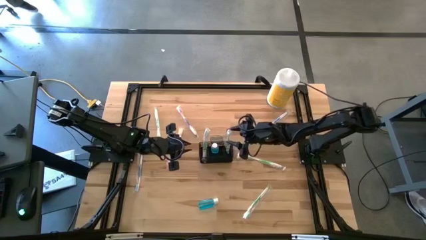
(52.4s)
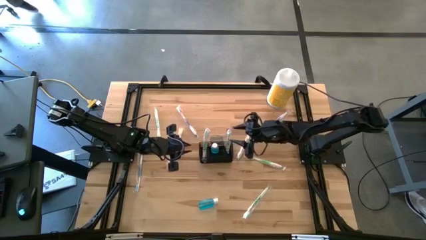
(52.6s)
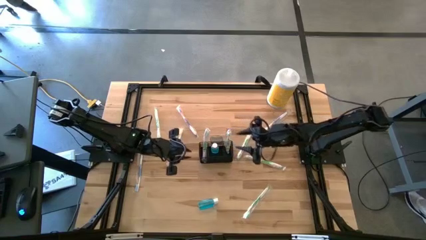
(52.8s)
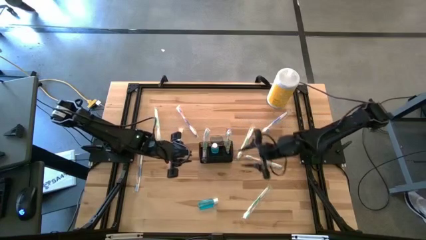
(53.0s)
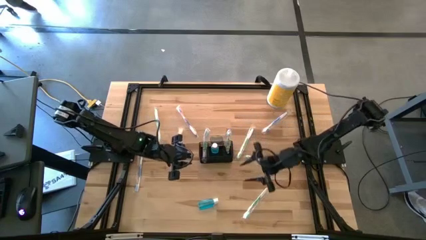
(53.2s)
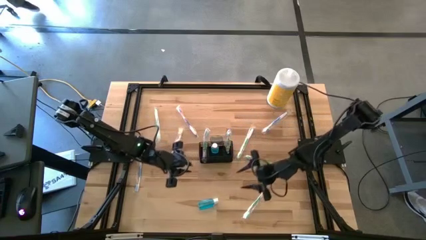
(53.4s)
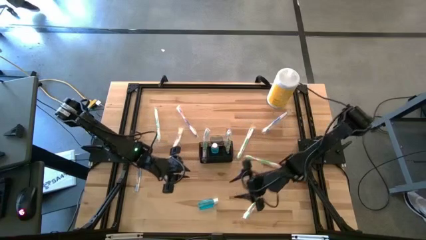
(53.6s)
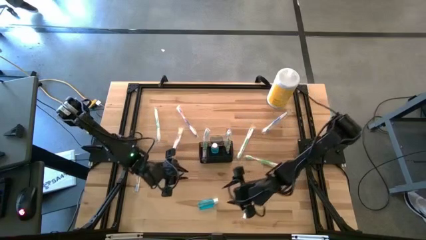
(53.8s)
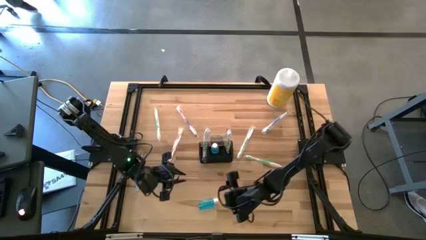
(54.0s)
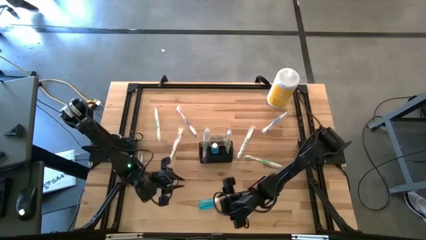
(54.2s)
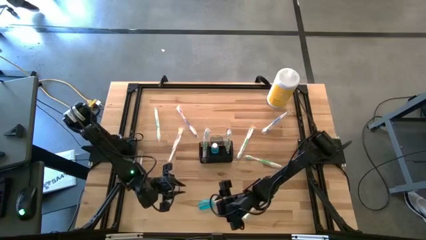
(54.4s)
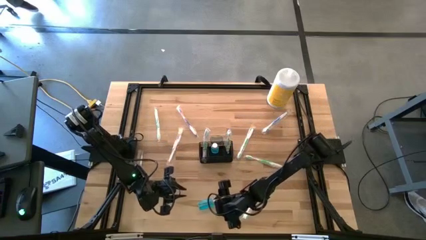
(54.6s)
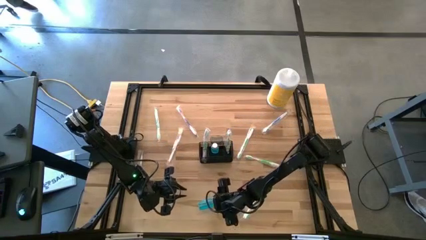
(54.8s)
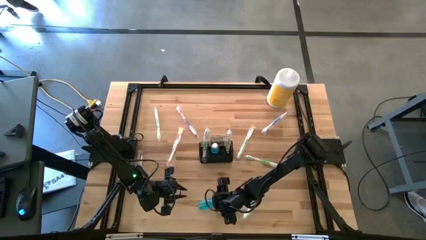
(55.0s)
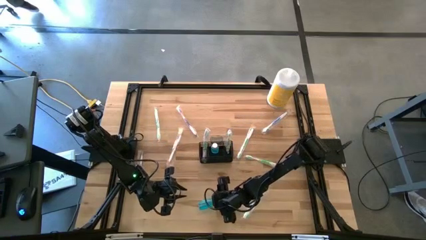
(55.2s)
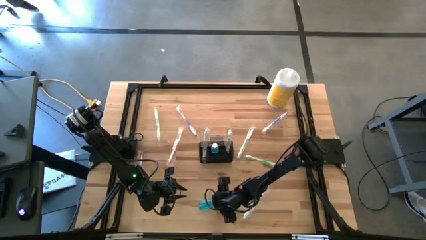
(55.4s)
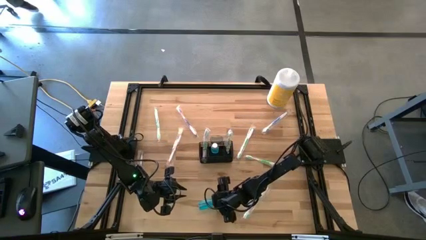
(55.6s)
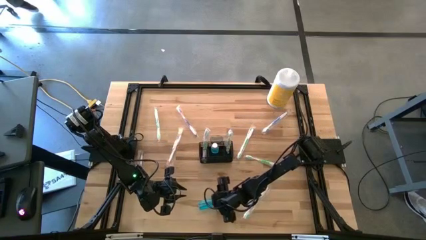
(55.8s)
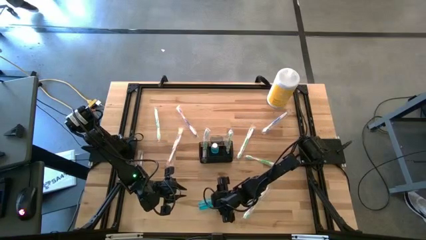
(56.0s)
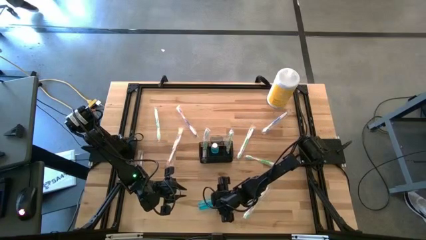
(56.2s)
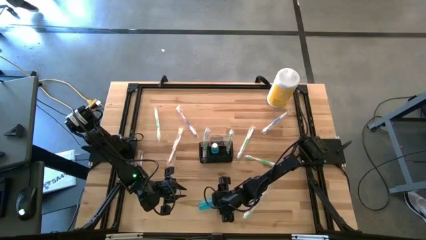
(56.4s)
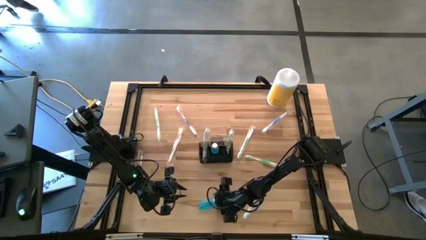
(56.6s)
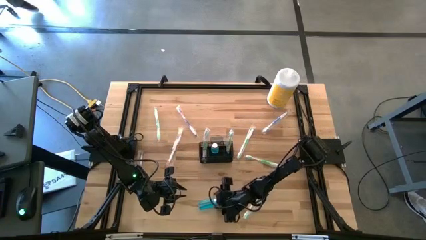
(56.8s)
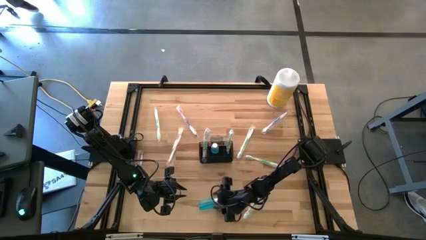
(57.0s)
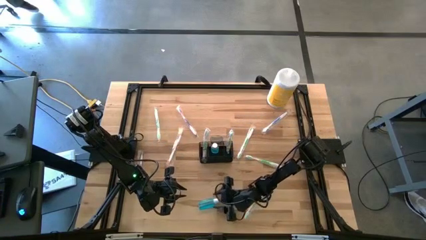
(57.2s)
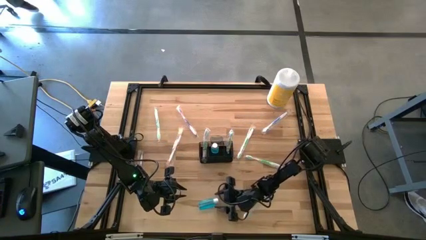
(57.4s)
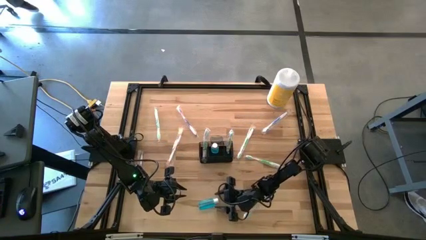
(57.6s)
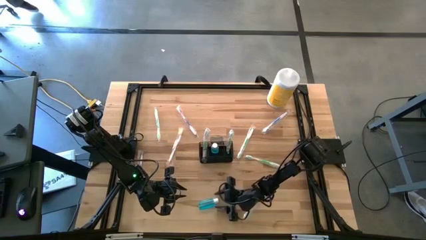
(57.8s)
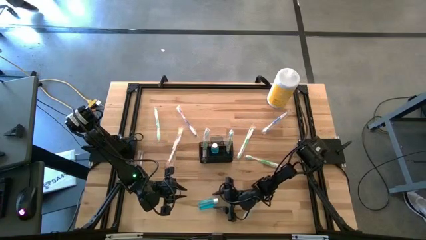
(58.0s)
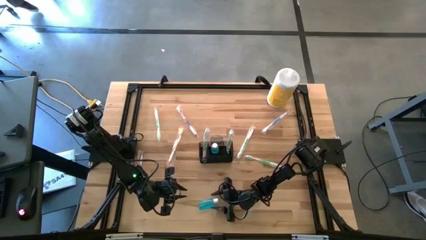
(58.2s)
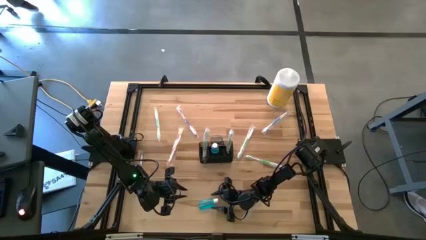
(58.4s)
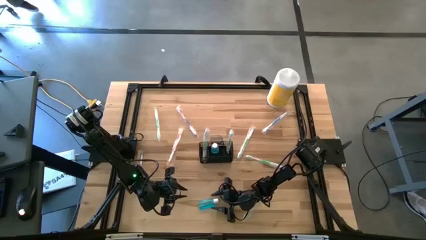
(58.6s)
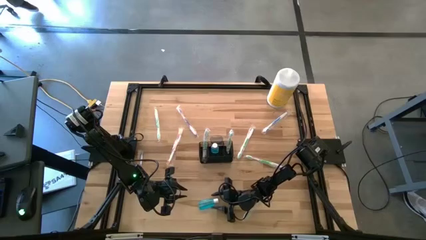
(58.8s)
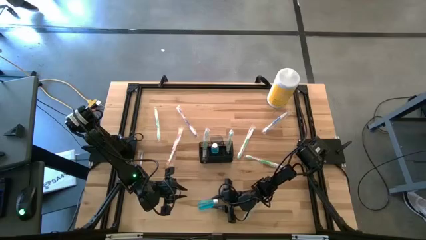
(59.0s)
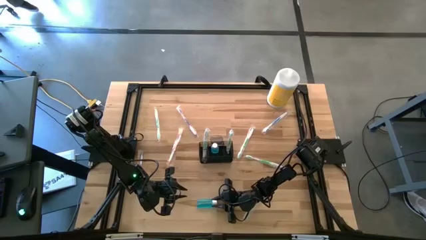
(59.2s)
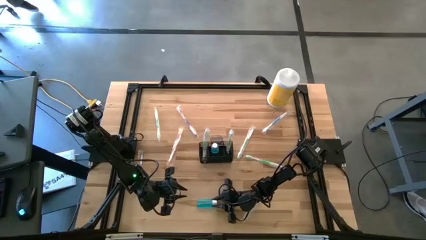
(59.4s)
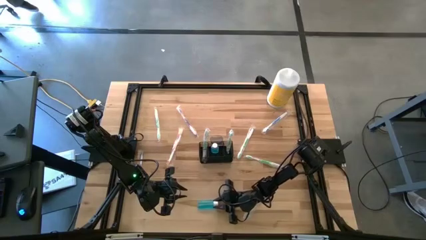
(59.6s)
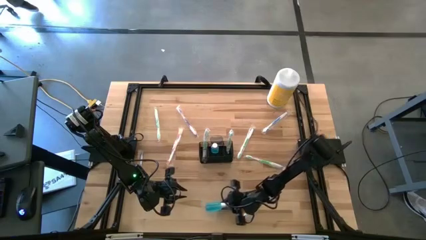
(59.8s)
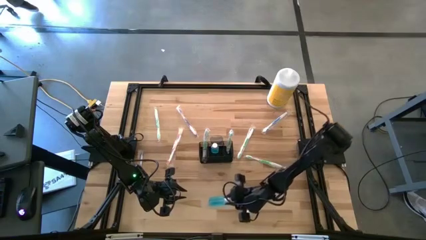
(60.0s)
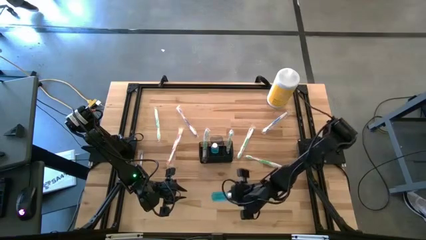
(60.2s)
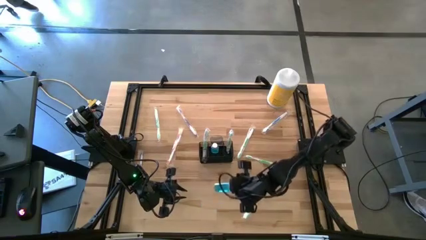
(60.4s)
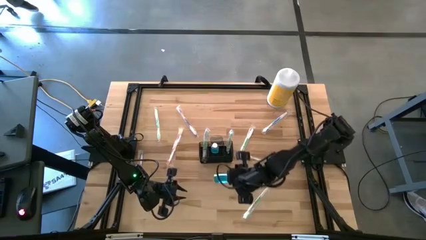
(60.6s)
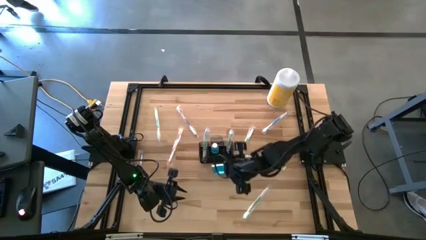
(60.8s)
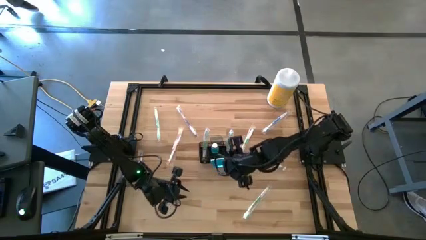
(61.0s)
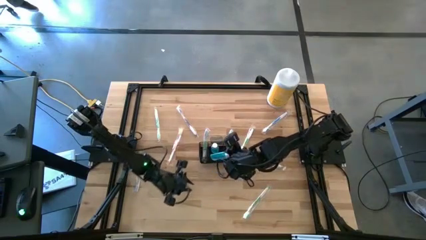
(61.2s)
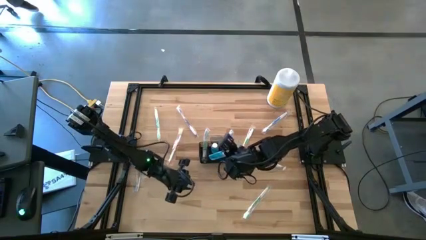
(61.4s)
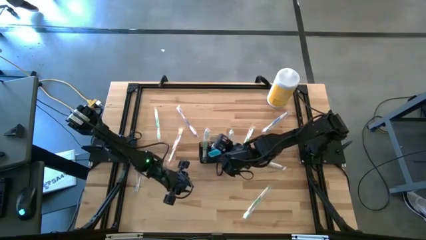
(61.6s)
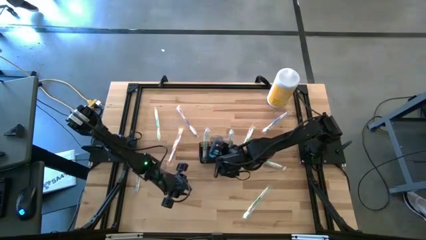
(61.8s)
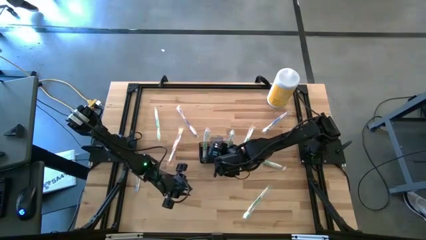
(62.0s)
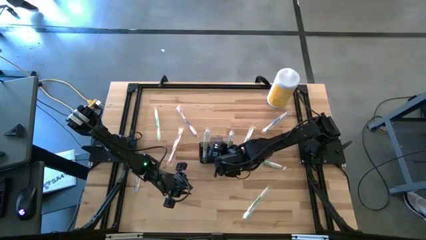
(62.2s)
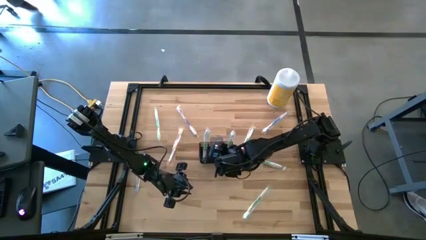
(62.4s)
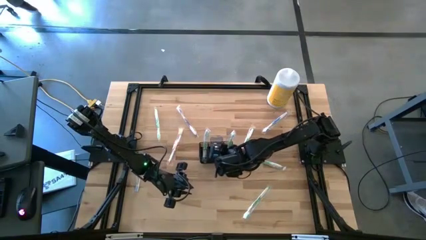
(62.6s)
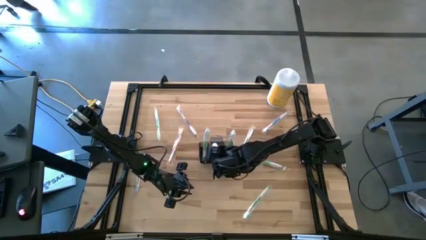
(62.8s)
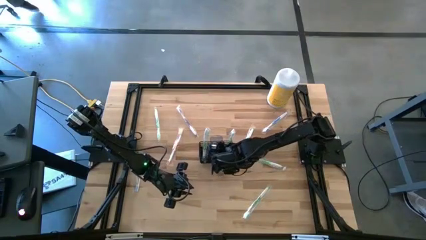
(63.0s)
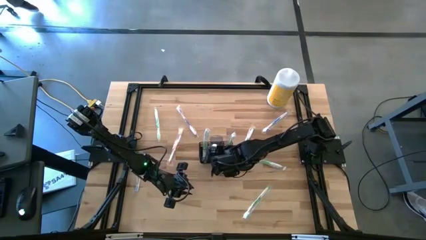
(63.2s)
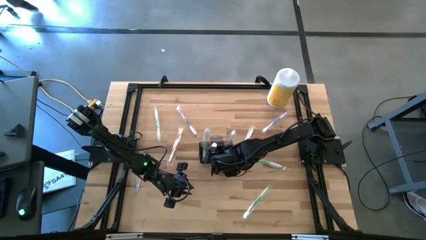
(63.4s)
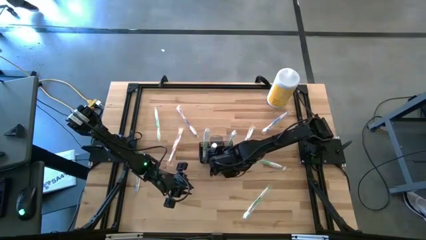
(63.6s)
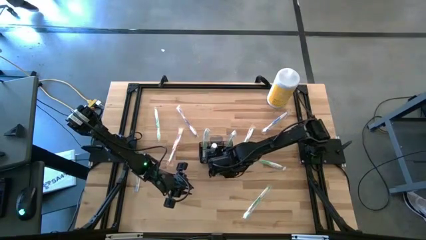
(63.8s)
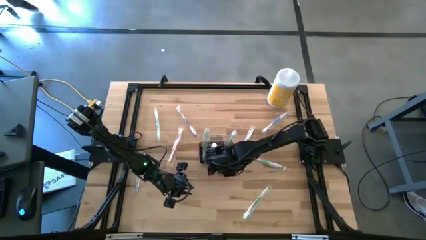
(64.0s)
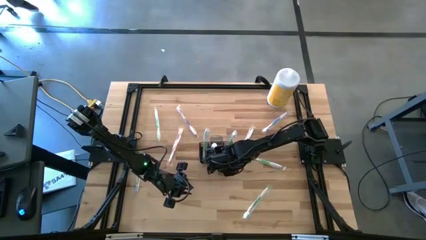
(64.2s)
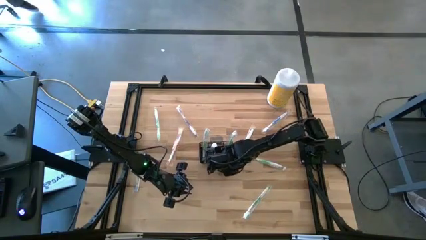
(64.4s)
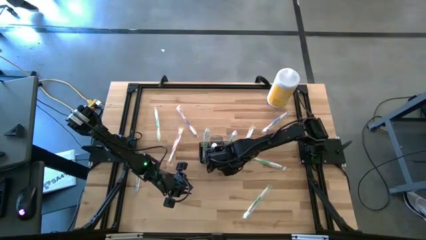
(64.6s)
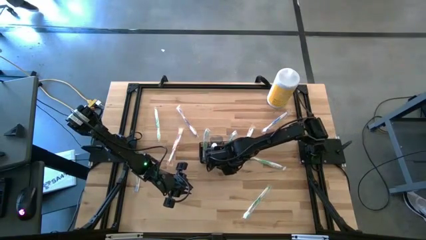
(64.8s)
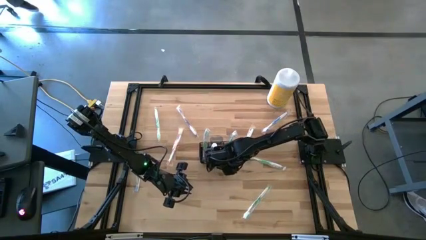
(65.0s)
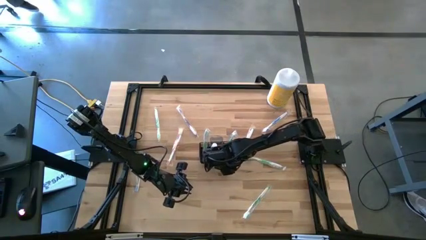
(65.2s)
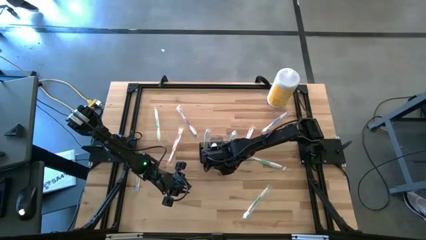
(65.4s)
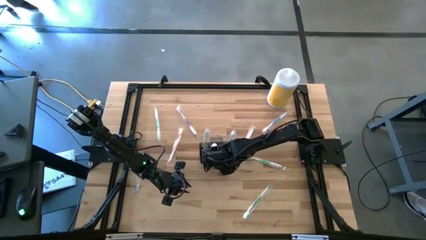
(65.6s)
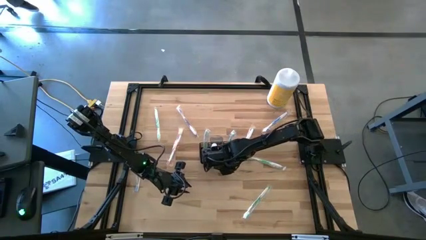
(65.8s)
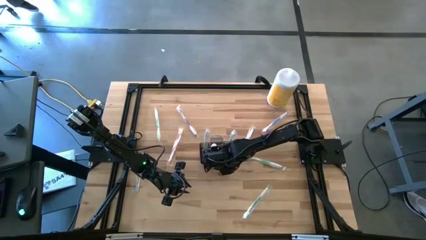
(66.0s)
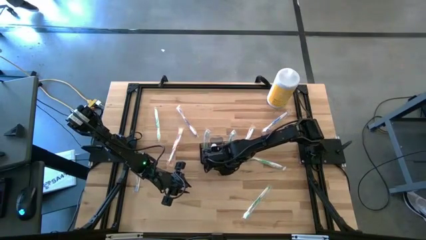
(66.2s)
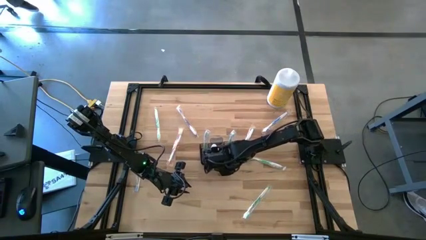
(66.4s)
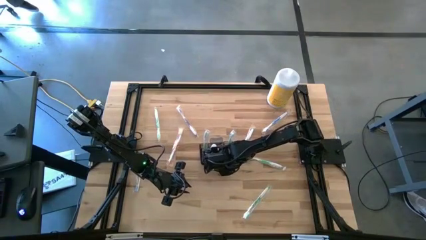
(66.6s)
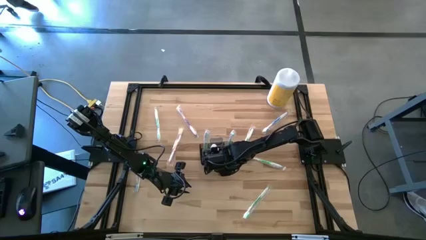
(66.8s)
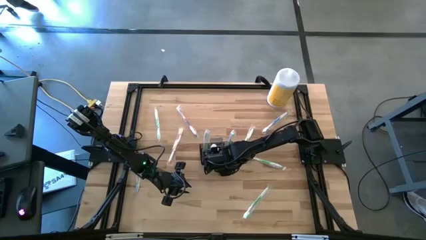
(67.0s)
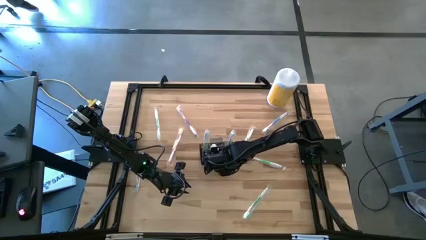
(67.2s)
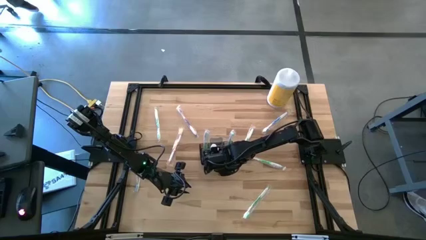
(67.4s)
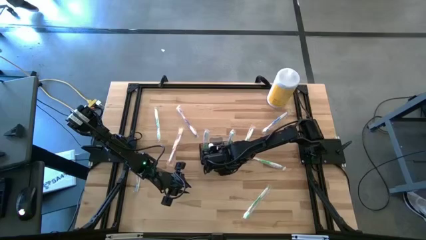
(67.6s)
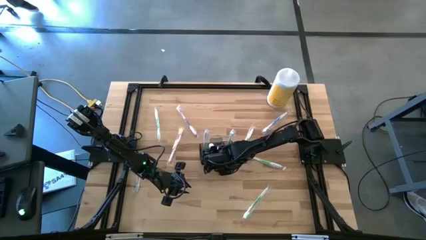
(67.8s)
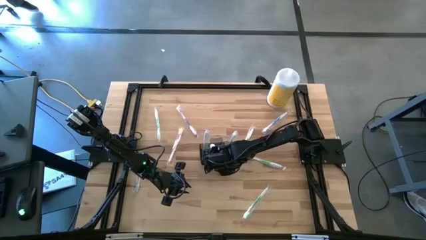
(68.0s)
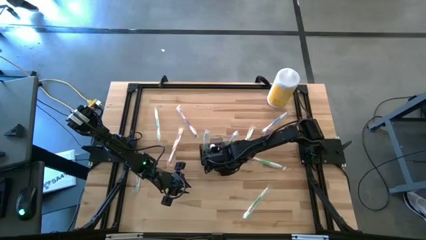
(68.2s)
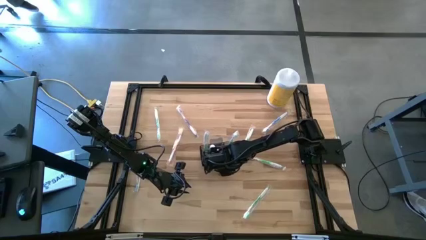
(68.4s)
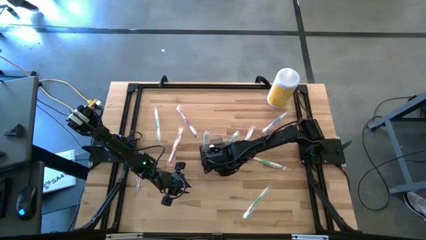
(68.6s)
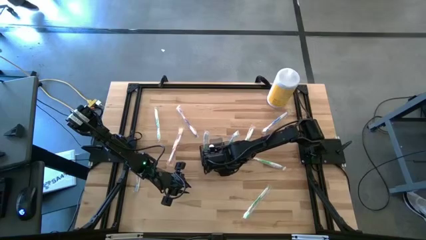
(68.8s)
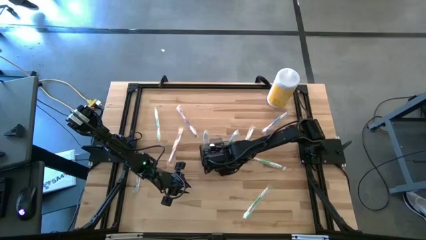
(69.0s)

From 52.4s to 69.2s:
Task: Pick & Place toothbrushing station
Put the blue mouthwash into the black mesh organizer
